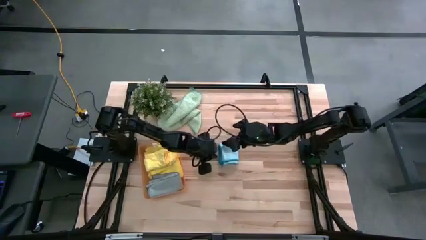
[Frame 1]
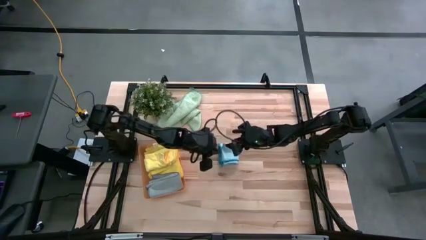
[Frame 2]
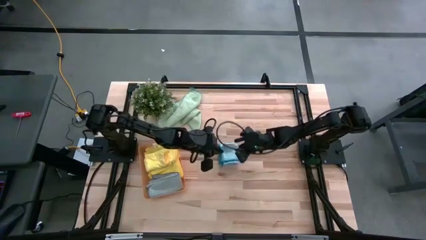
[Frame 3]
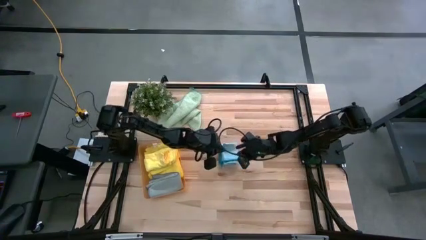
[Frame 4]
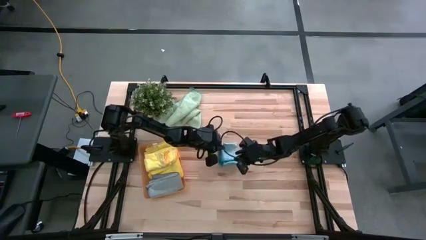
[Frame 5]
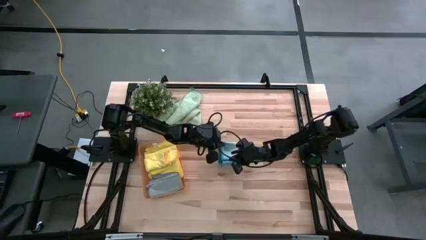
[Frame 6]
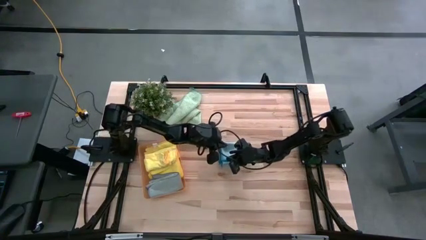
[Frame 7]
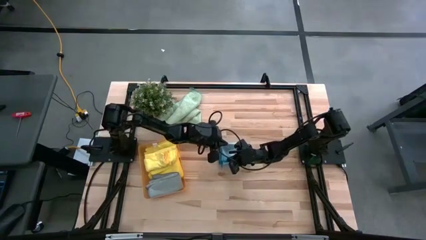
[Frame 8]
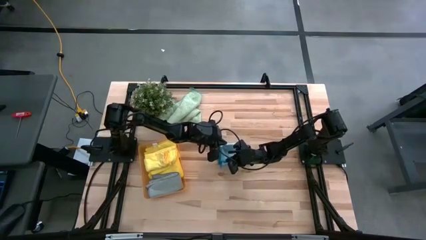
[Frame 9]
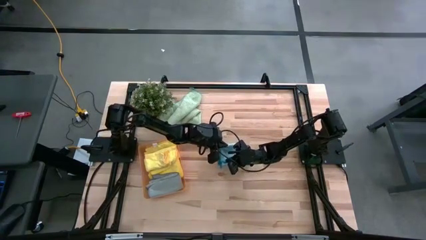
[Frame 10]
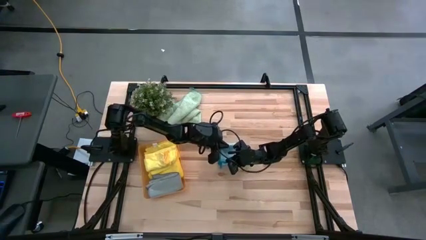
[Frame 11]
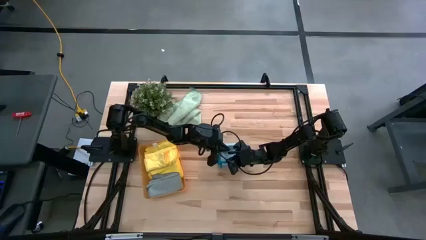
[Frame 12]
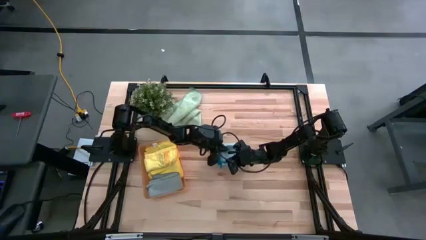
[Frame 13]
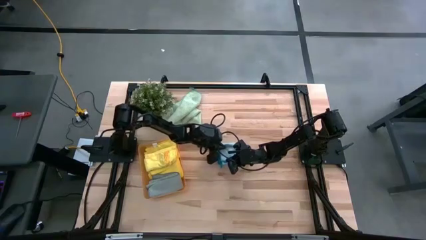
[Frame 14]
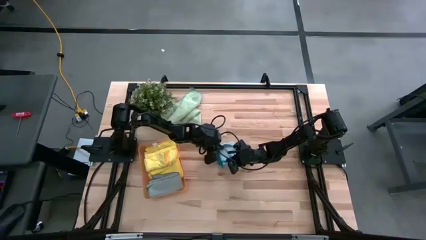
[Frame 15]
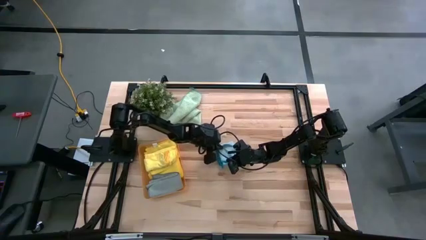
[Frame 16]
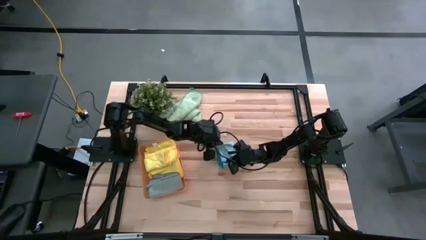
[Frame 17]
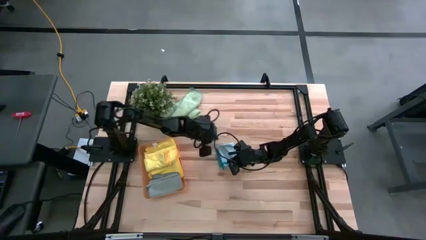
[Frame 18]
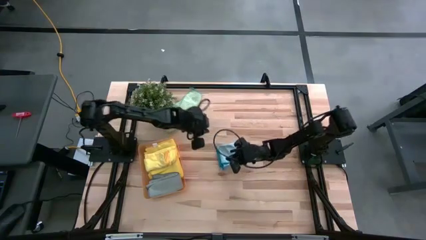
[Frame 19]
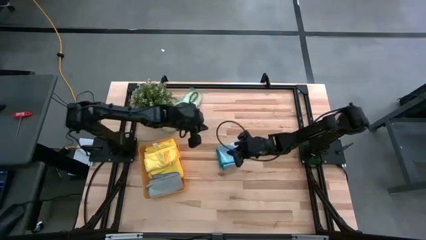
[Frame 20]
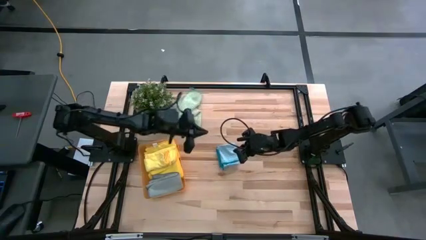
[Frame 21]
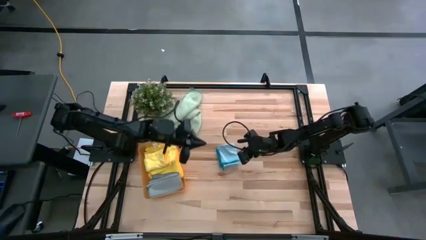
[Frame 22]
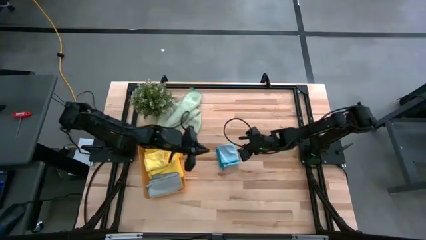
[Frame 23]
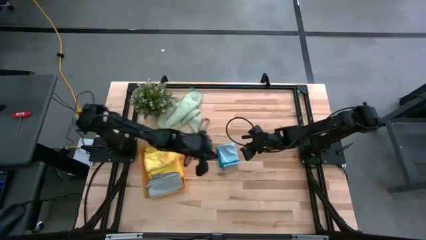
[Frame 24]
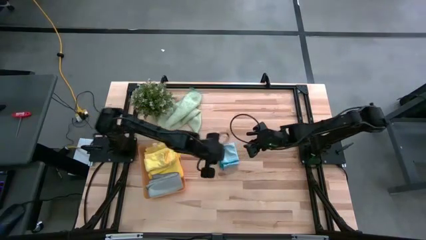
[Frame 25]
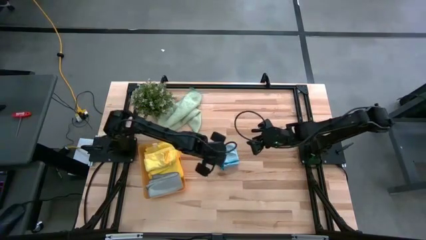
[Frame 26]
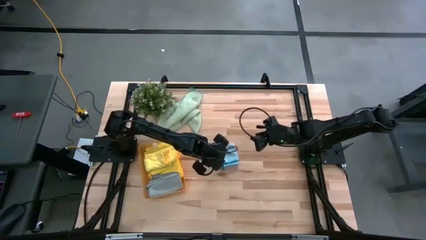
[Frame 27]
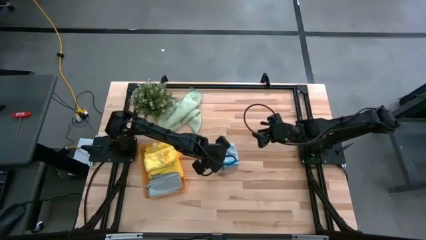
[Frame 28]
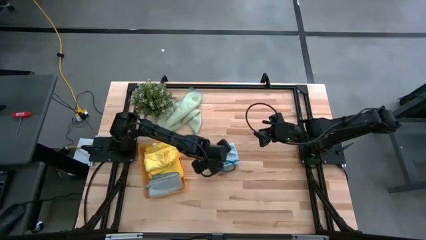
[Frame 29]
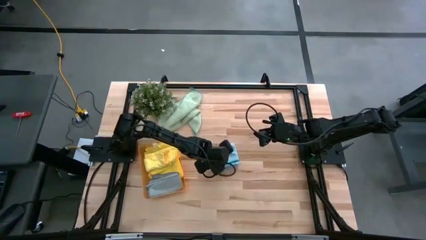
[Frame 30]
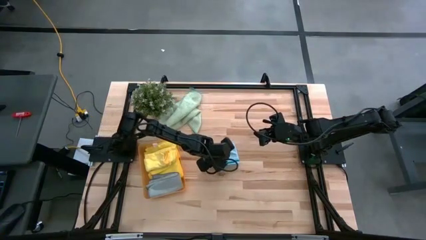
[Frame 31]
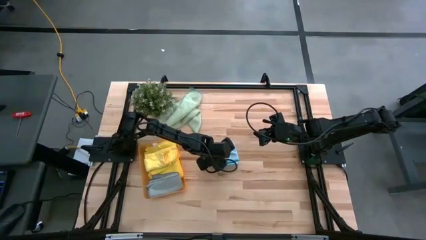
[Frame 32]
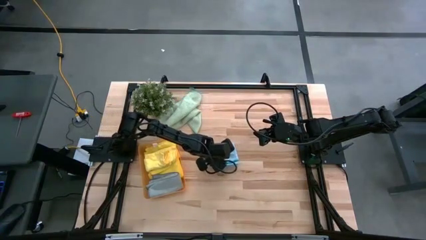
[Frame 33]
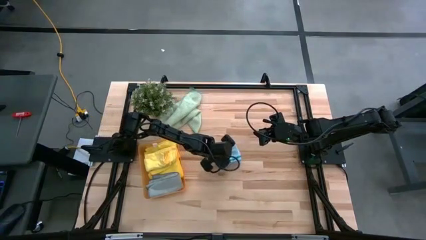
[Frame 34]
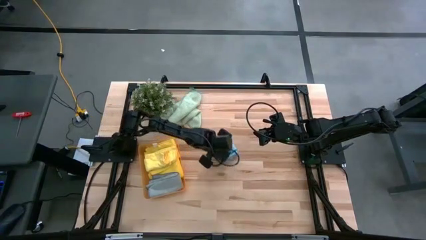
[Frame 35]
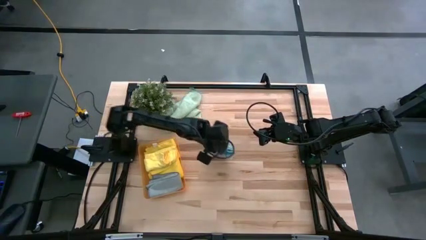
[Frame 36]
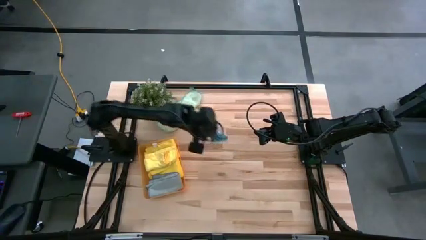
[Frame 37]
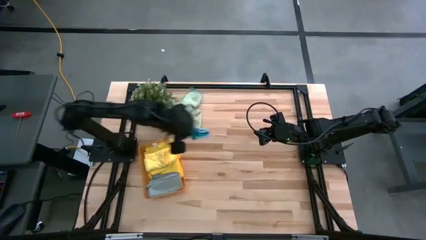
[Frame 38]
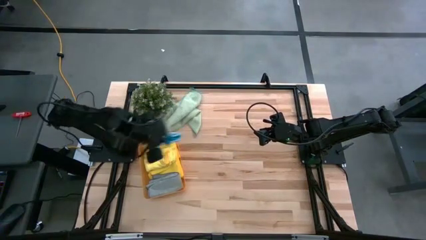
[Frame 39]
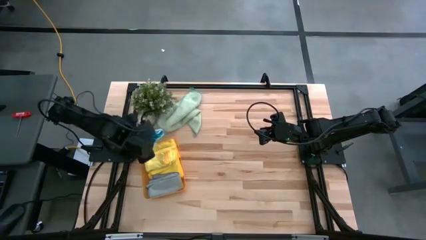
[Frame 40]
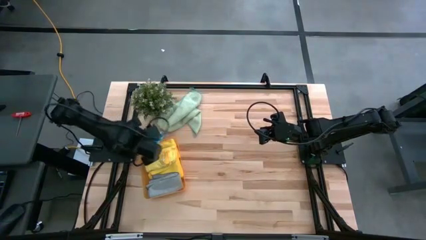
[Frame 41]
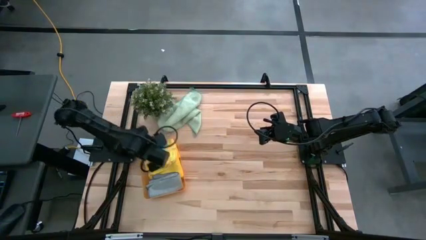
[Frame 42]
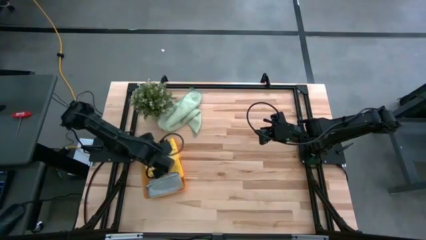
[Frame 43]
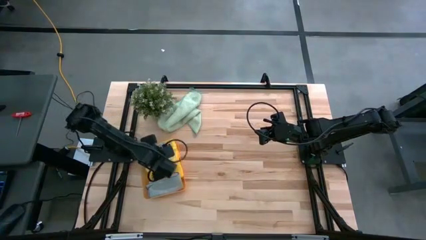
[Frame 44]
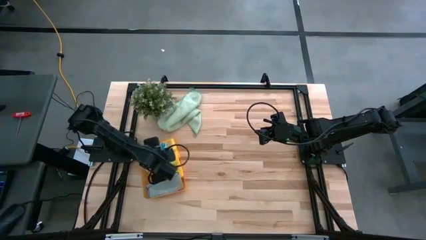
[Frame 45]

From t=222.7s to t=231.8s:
Task: Fold microfiber towels
Put the blue folded microfiber towel into the orange bin

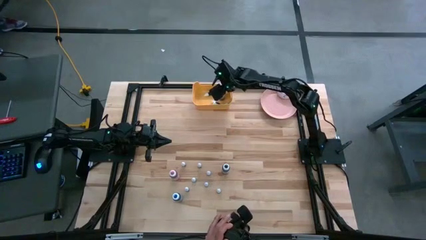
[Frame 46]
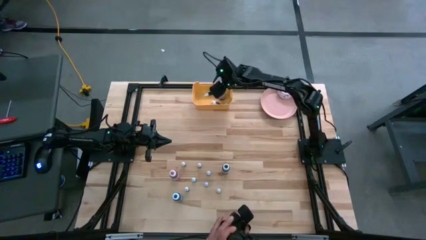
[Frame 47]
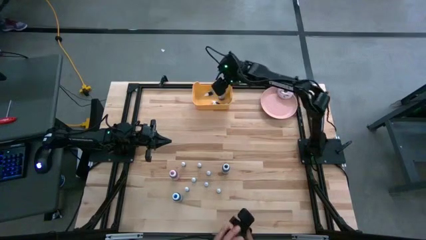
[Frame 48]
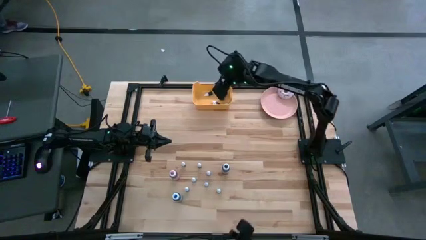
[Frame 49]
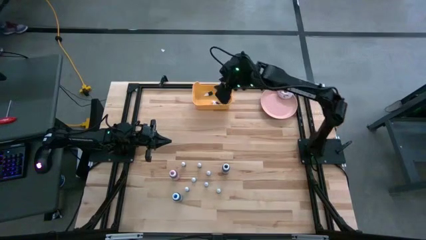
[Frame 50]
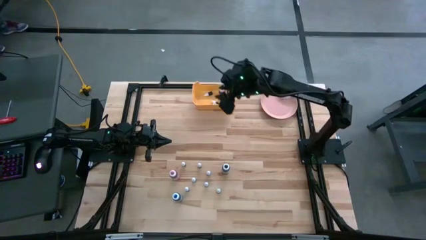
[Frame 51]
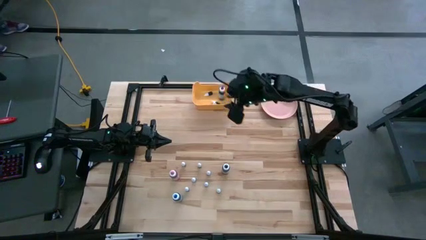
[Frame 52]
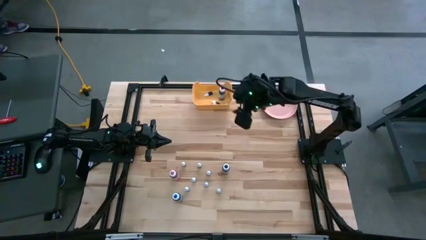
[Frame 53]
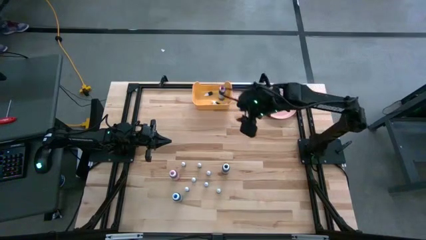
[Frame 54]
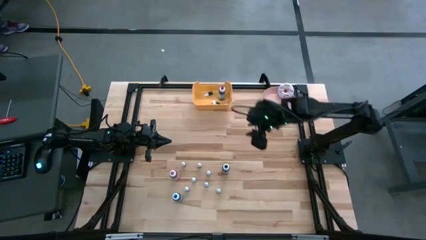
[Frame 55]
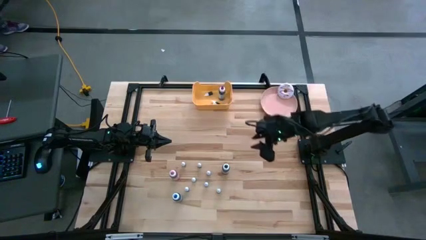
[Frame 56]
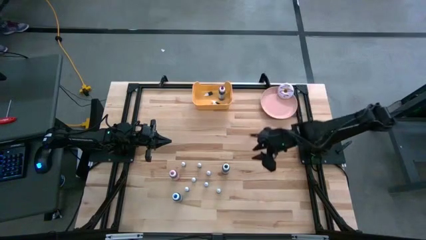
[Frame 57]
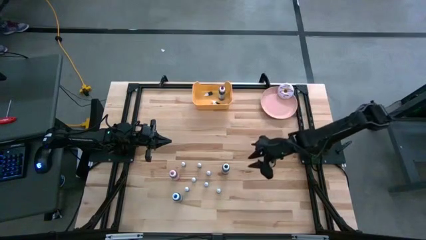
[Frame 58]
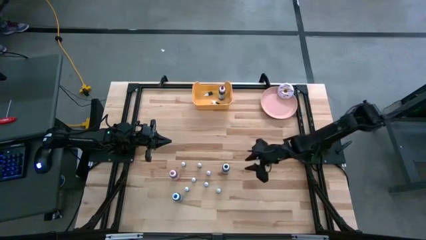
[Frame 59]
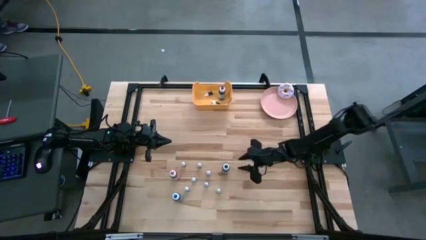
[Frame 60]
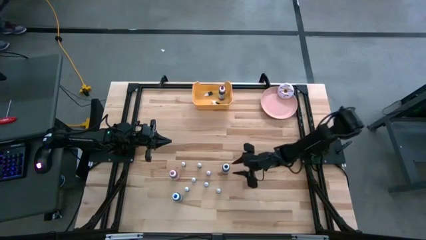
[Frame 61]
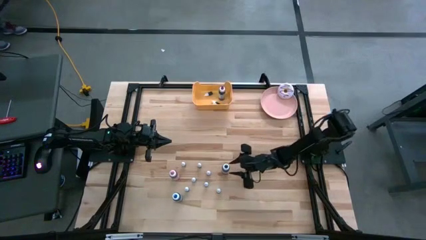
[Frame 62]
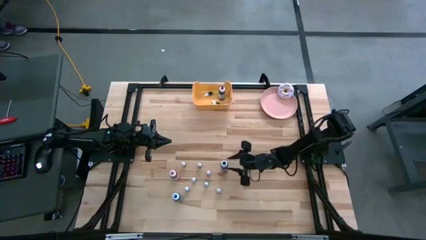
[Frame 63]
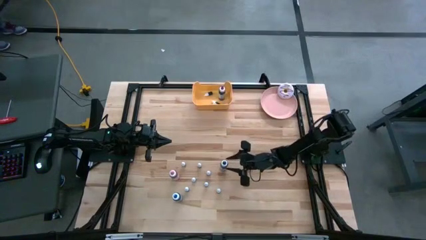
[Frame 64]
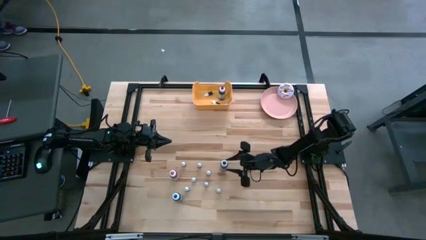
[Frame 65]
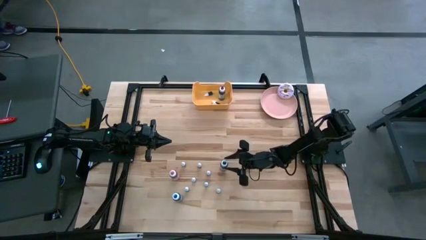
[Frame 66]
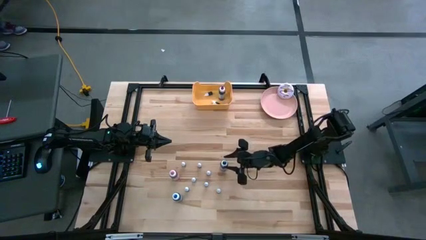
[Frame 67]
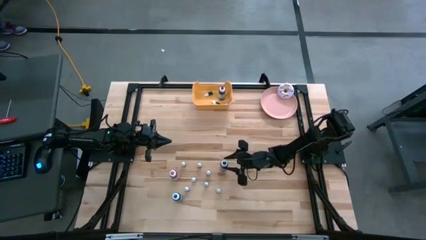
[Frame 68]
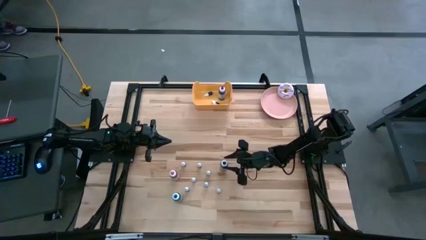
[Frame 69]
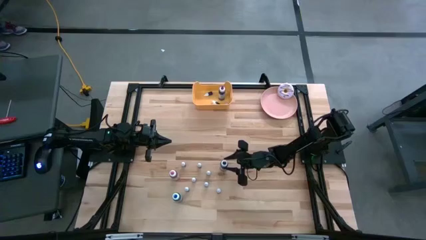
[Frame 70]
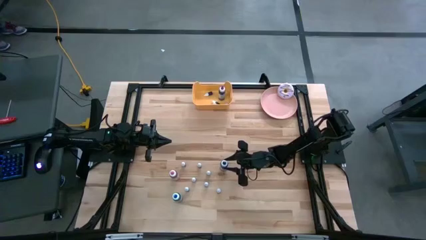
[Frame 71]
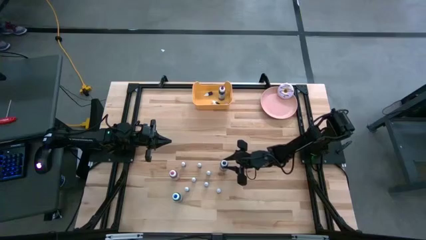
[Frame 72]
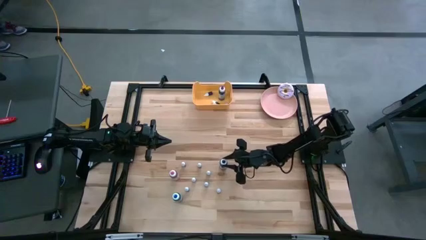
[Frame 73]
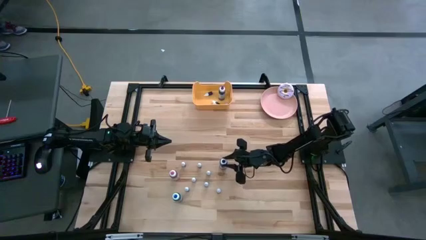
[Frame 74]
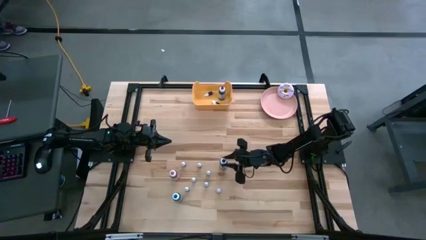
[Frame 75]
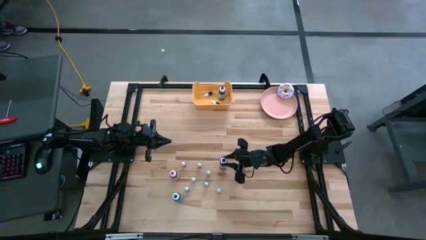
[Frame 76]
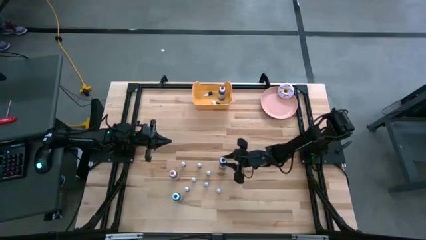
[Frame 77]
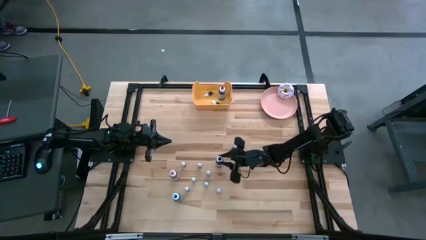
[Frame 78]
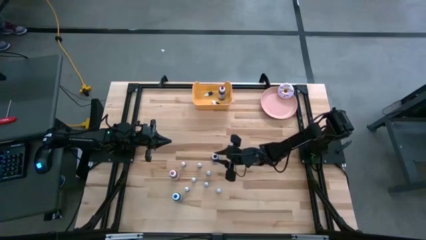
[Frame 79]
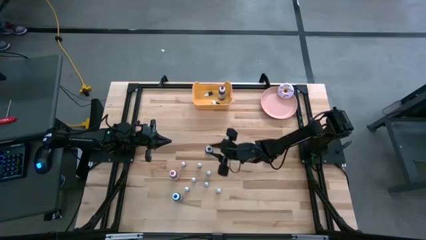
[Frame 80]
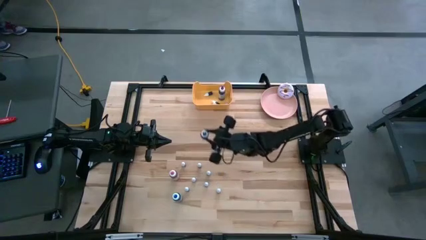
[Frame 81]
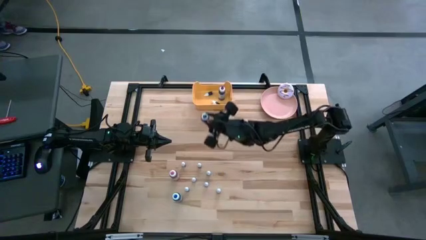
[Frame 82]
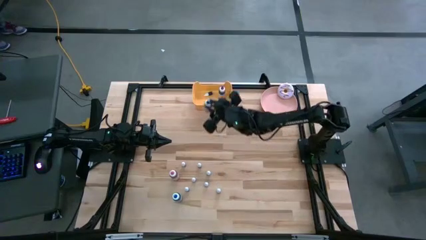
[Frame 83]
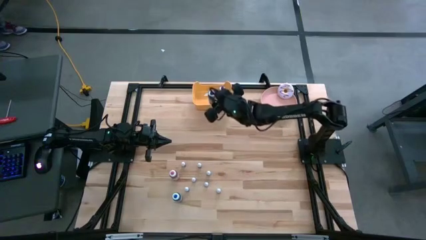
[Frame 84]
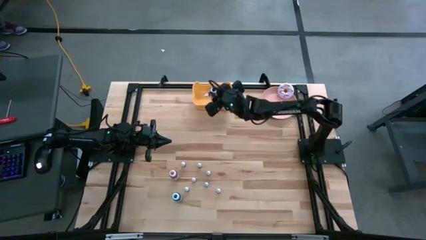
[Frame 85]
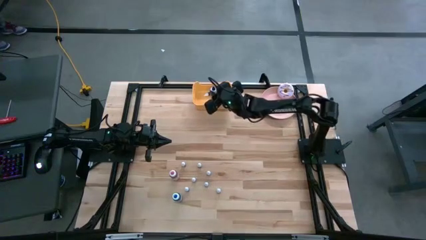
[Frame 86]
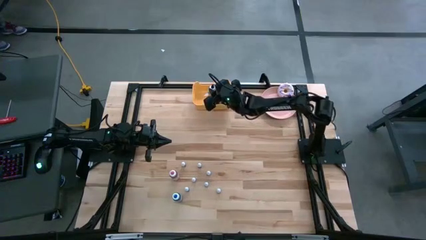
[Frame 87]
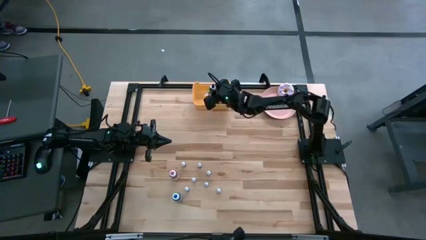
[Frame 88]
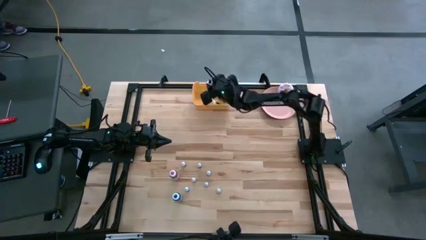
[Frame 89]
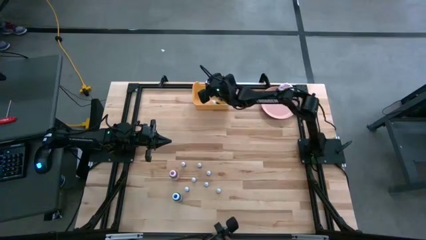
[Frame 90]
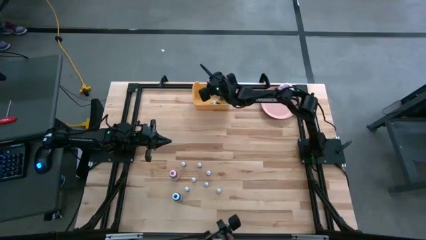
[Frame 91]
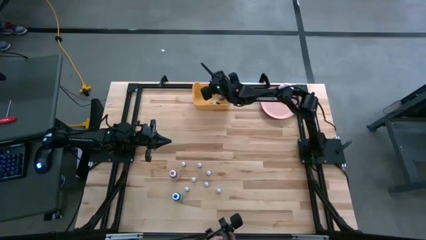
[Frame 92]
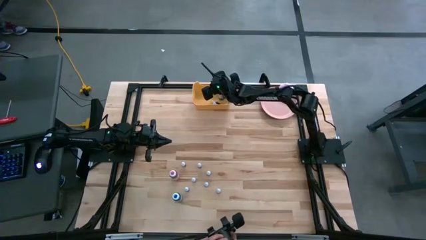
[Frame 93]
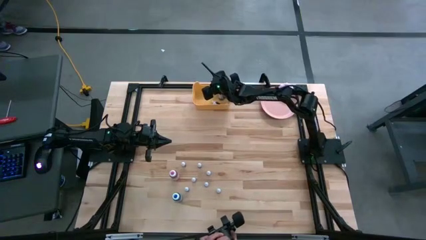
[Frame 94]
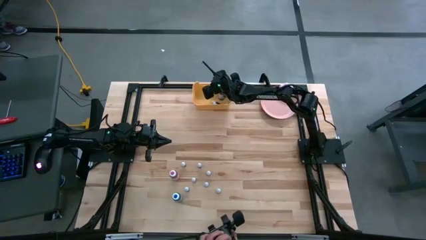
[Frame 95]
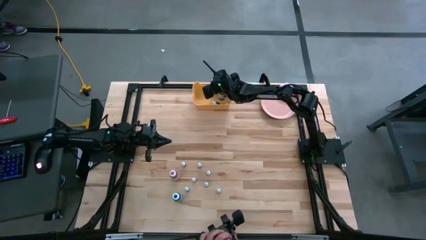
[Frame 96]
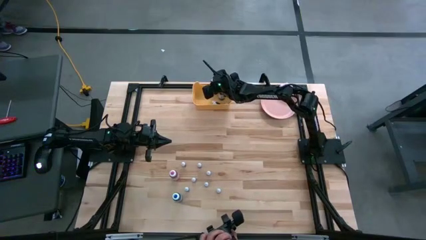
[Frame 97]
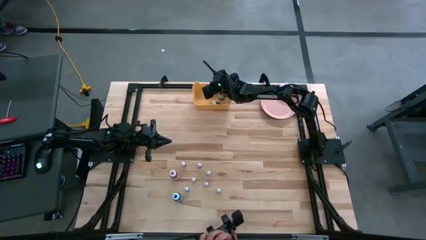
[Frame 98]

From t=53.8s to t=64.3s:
Task: Pick & Place food coloring
Put the big black food coloring bottle into the yellow bin
